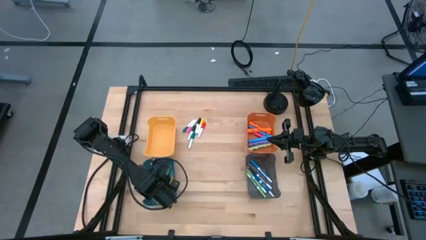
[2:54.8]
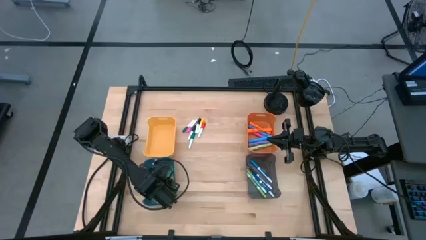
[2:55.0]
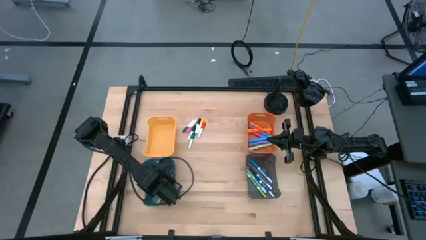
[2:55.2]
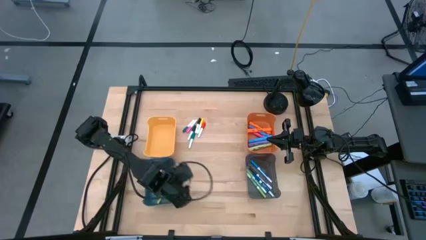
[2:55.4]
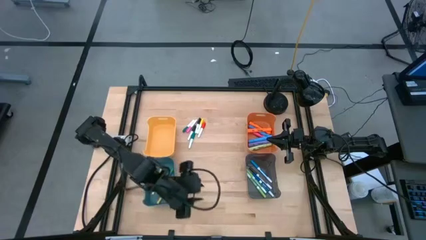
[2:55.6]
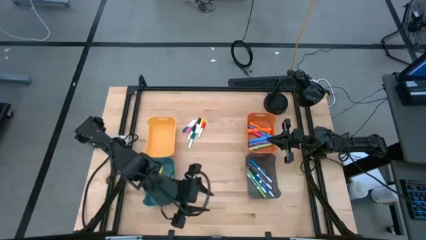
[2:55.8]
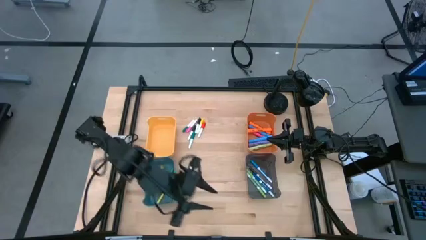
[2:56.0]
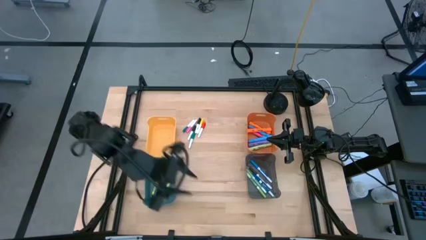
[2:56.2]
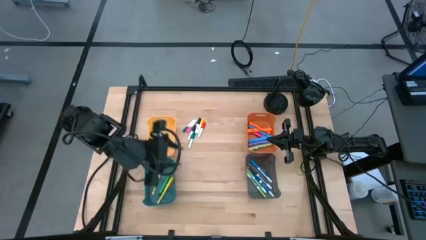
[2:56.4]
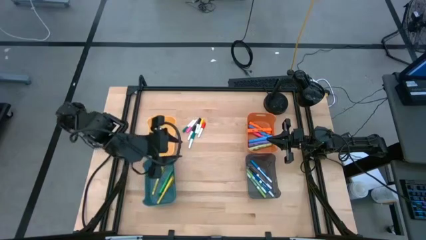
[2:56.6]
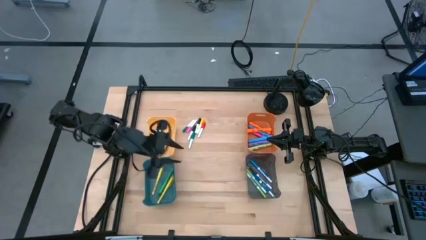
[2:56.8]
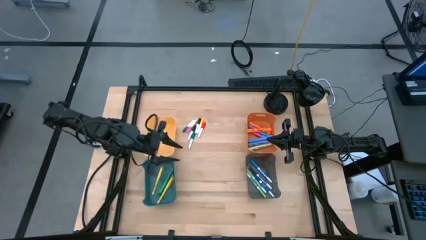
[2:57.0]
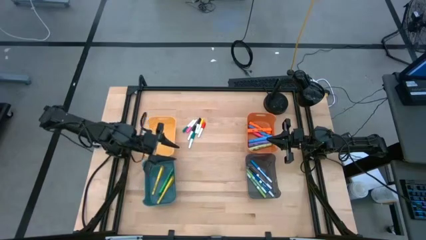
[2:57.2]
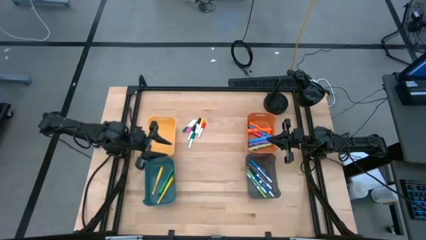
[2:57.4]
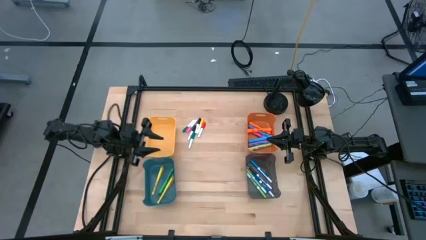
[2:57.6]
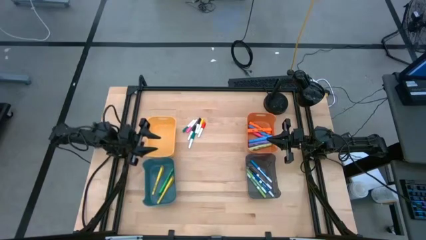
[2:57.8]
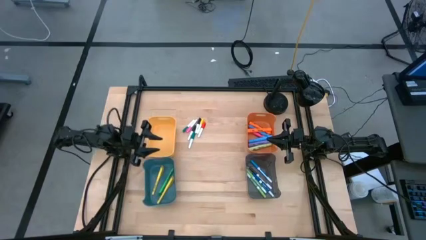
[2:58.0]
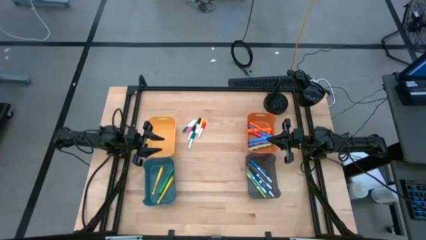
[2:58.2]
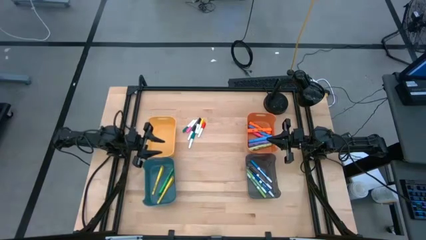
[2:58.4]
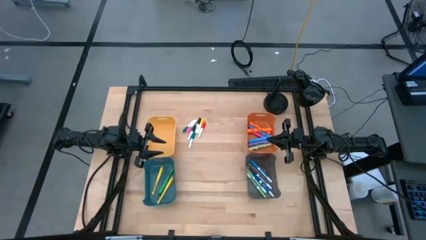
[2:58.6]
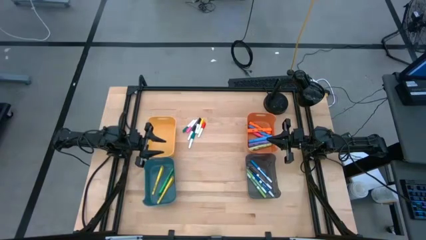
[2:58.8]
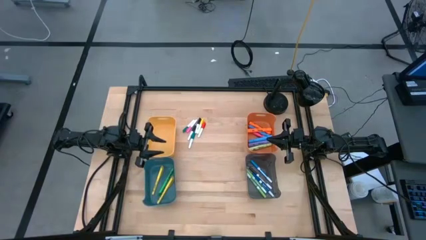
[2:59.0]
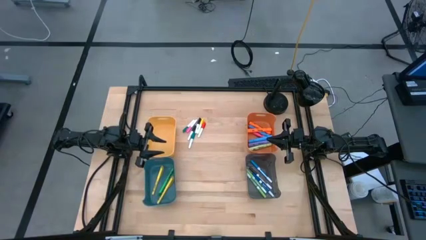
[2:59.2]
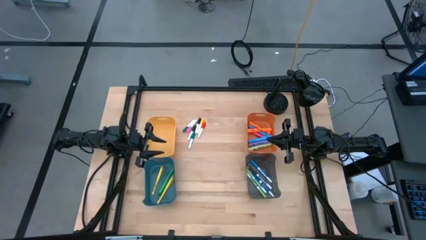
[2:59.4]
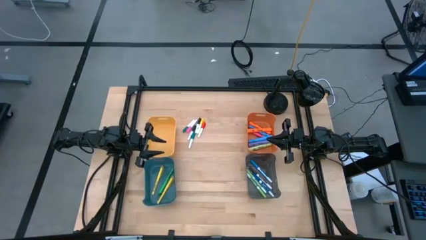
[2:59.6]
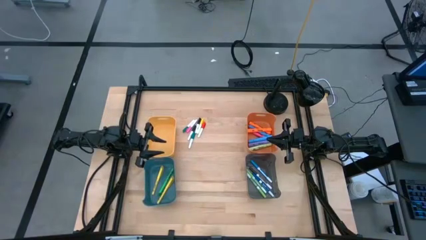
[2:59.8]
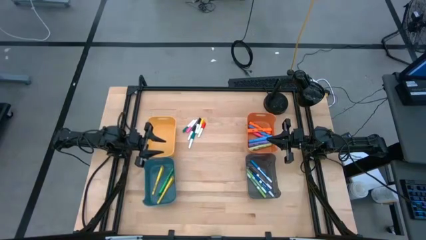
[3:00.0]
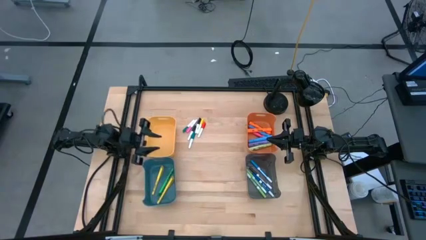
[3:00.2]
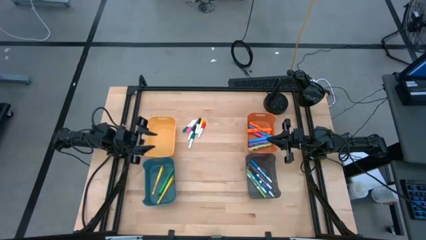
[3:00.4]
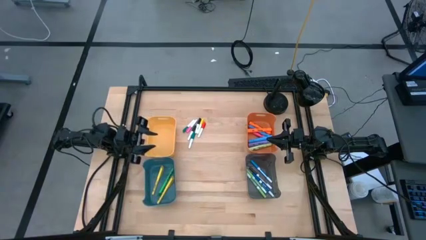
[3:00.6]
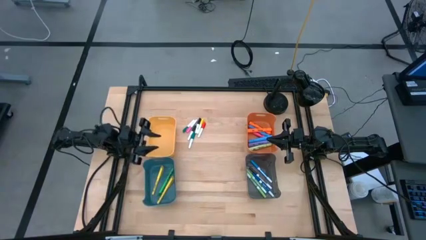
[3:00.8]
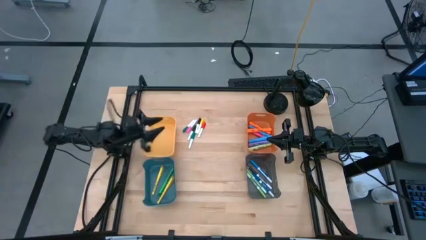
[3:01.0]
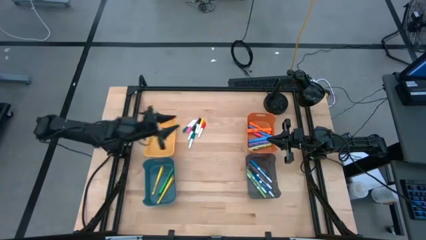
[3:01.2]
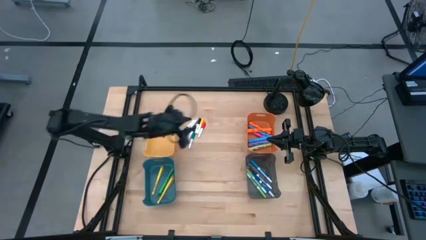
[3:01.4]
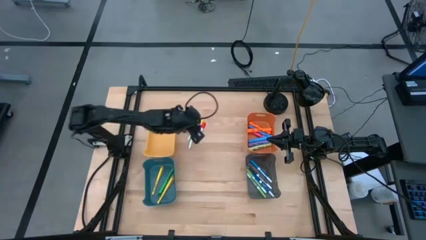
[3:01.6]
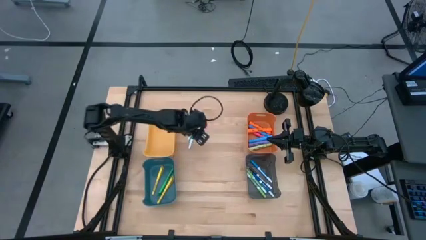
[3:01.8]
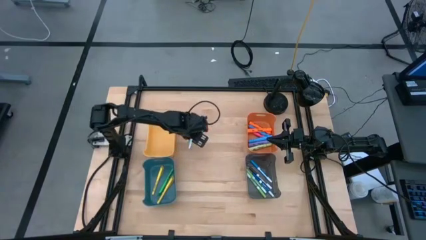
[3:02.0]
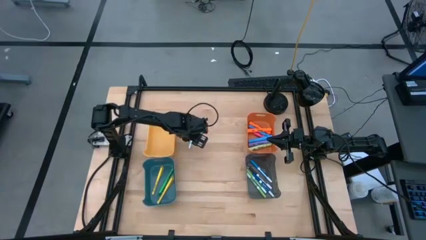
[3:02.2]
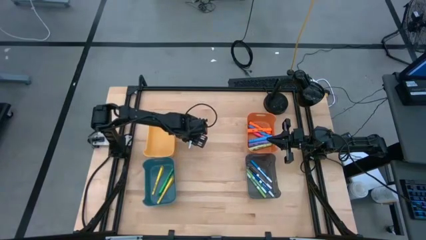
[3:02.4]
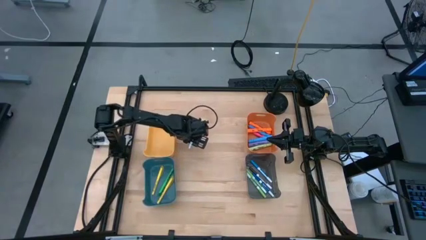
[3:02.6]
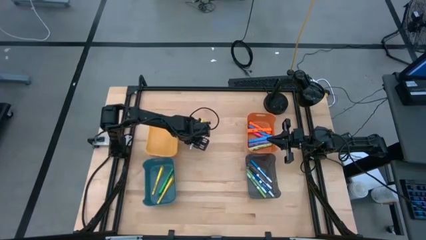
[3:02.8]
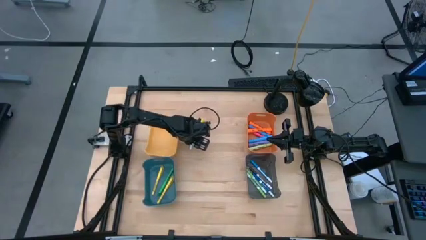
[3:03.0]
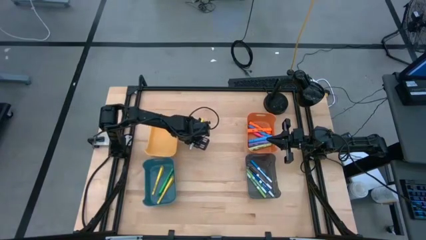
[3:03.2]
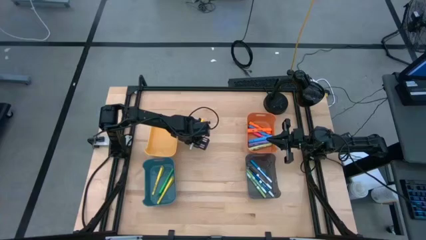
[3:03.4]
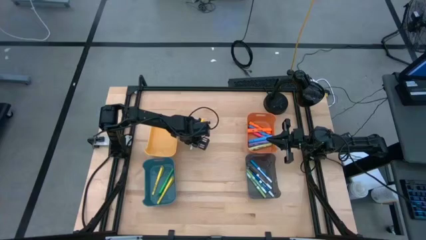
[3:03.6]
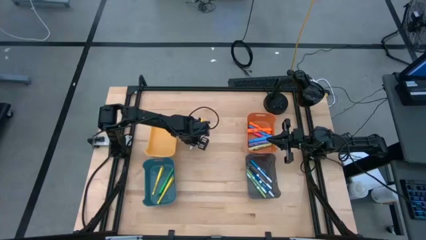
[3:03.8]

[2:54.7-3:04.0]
Task: Pick & Place Markers
Put the bottom dark green mini marker into the yellow bin

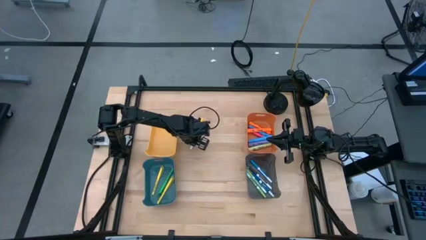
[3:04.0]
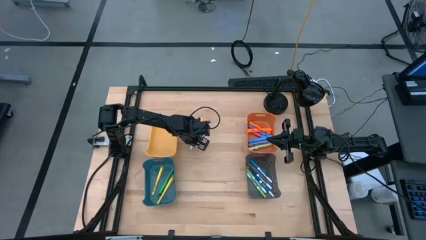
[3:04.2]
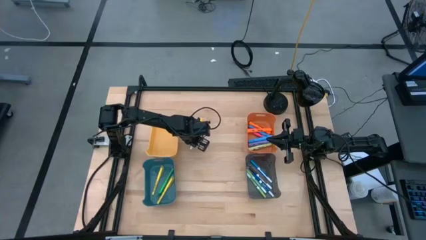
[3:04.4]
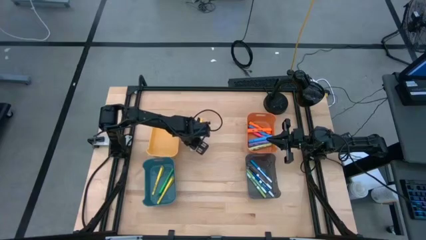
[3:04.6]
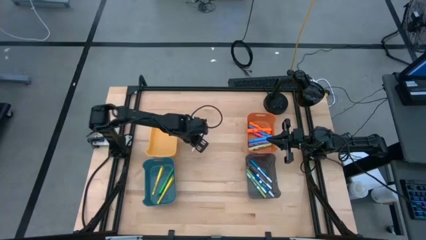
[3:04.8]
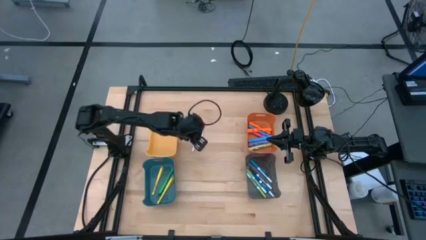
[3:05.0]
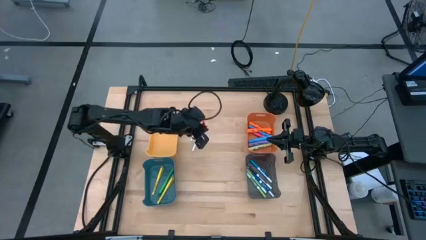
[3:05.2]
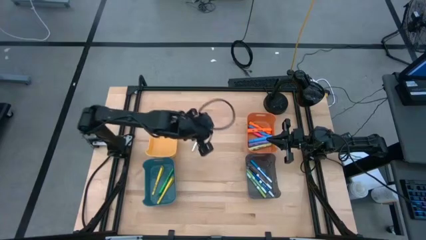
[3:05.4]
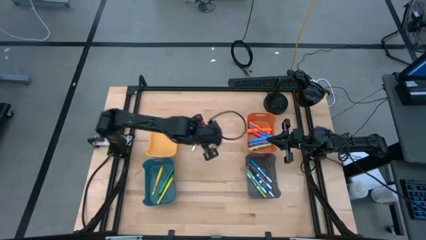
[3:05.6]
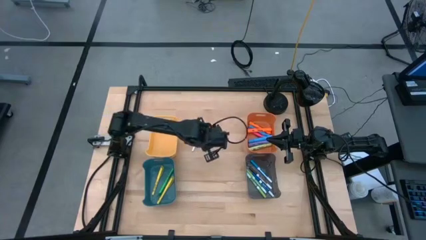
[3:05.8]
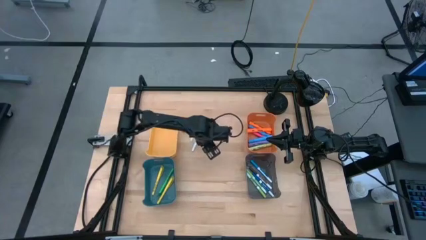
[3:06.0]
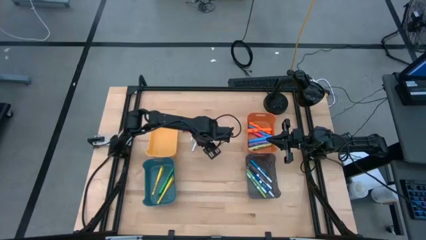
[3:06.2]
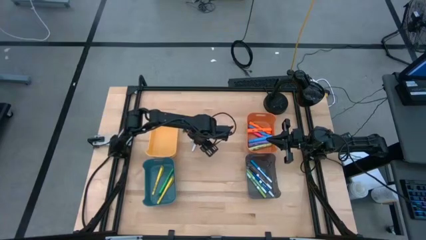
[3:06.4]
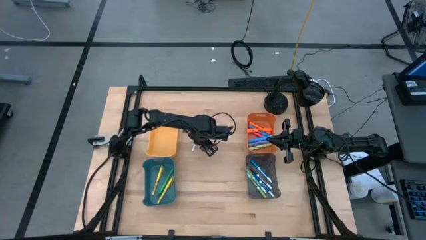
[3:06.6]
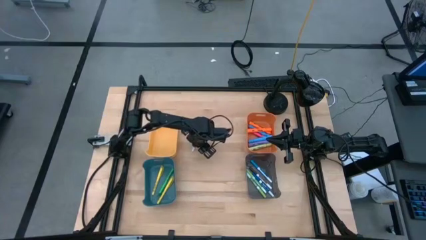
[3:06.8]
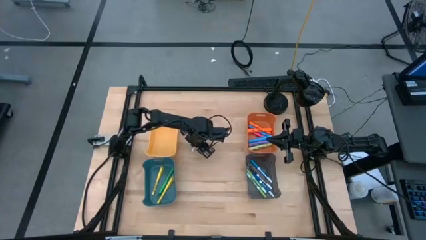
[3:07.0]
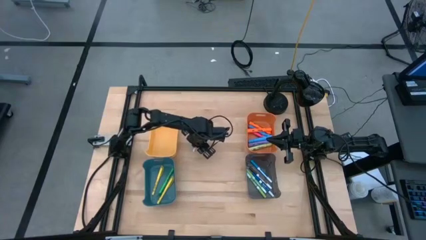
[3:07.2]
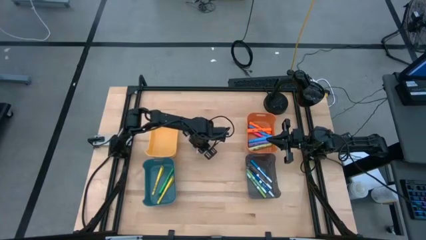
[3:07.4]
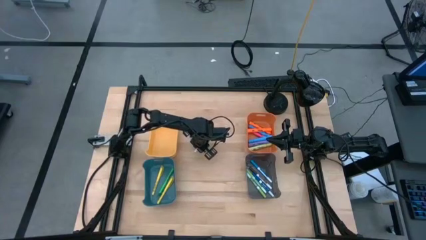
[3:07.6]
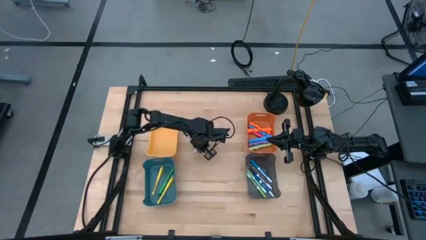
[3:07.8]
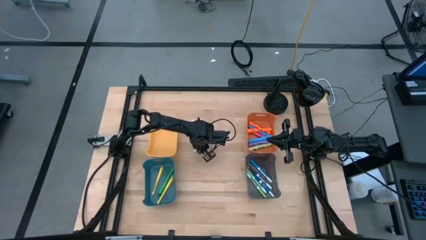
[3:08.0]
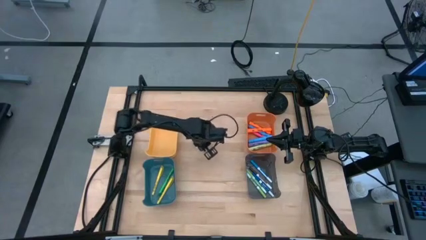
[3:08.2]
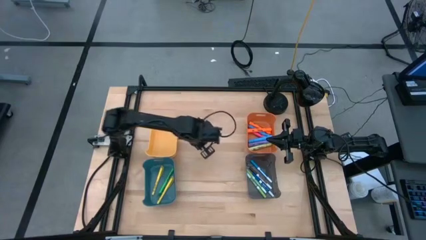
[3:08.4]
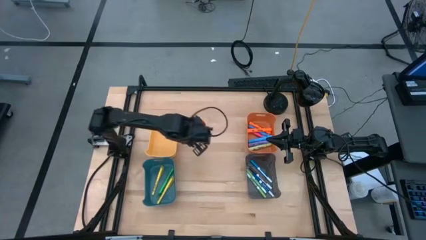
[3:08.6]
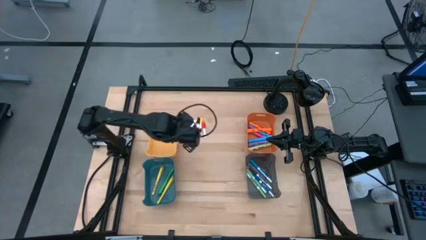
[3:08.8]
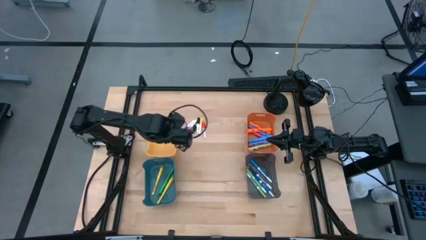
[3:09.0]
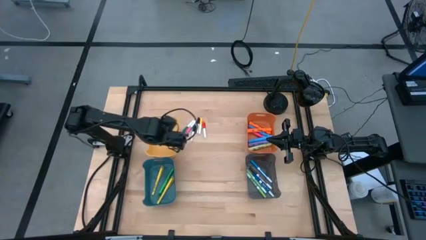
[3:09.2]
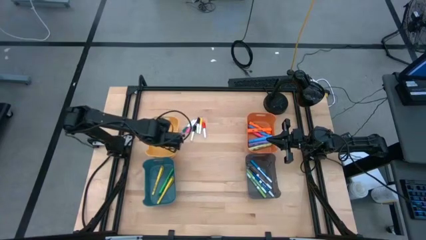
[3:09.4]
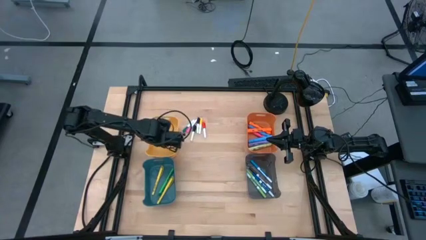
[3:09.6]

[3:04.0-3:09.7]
Put the bottom dark green mini marker into the yellow bin

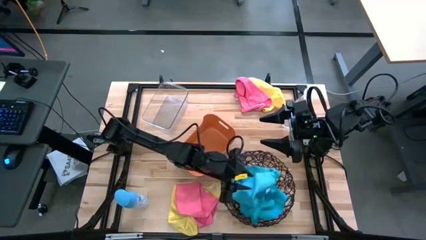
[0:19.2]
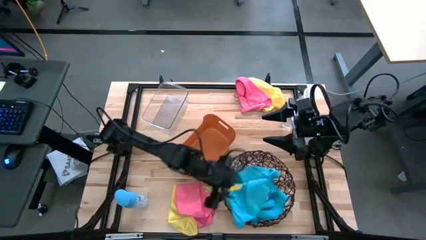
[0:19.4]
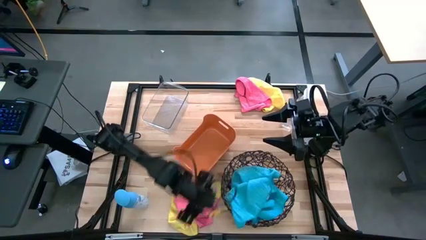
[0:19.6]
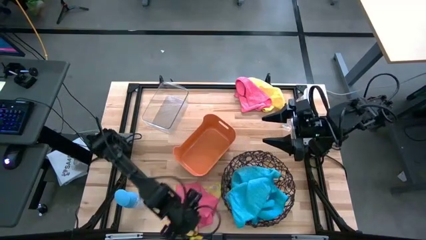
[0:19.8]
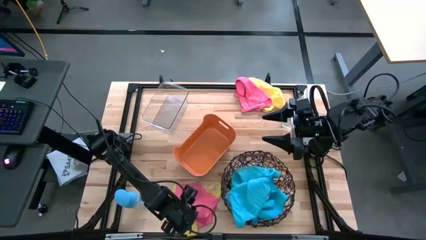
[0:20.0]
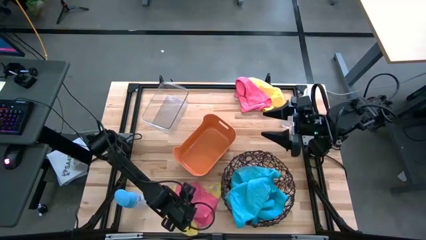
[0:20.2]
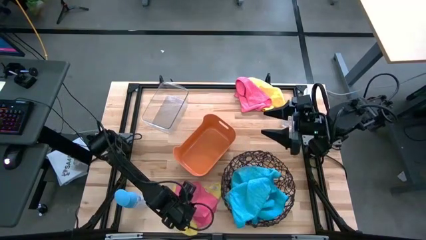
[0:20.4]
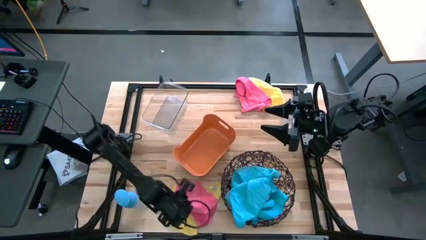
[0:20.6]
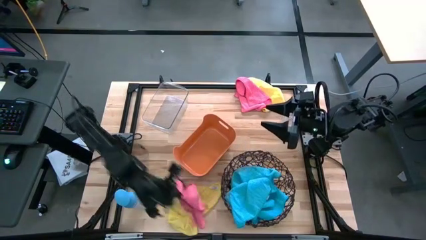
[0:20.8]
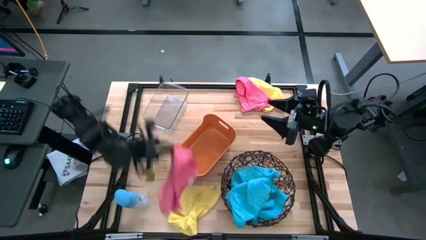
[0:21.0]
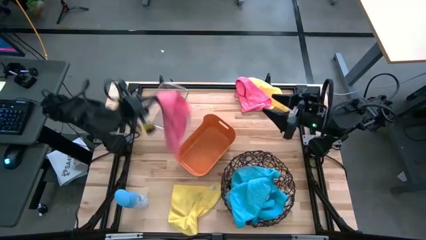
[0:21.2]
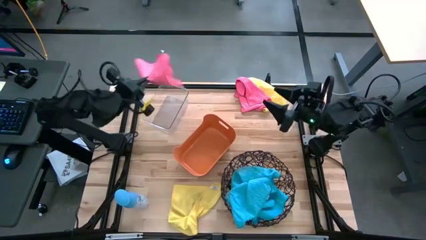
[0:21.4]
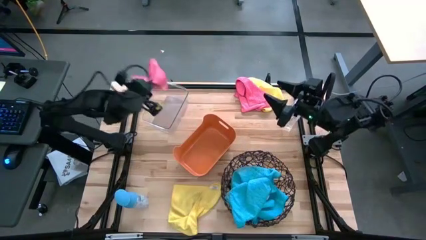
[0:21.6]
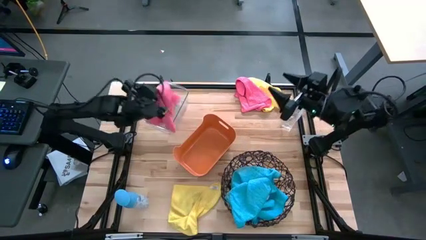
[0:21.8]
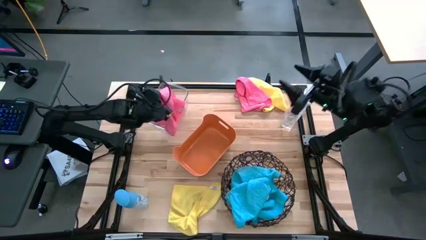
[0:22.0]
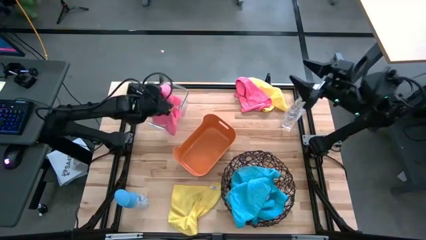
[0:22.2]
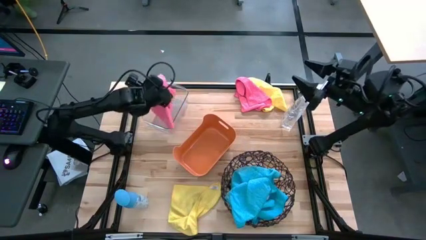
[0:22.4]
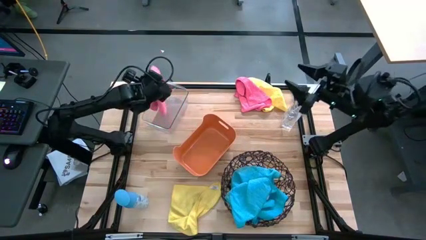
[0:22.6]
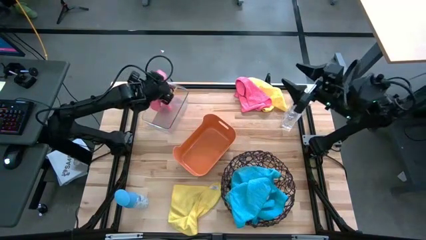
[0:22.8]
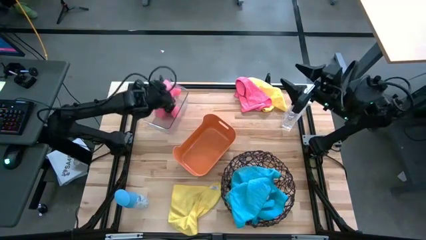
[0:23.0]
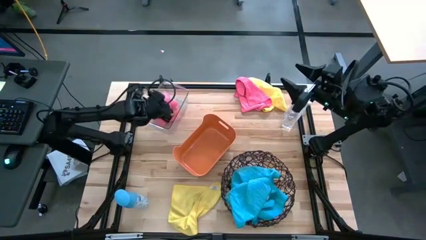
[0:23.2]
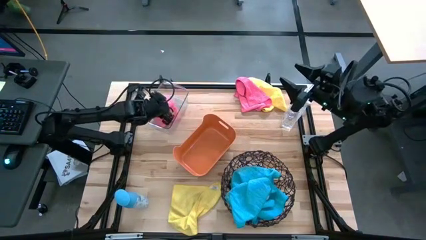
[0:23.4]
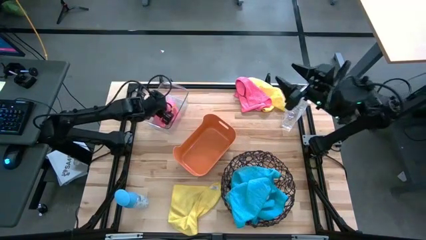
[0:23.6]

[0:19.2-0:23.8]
Task: Sort microfiber towel by color & place in baskets
Put the bottom pink towel into the transparent bin
